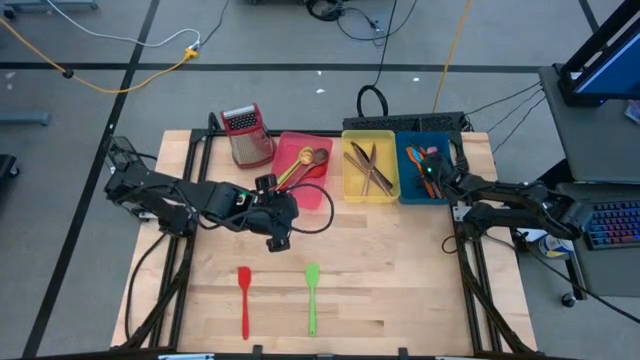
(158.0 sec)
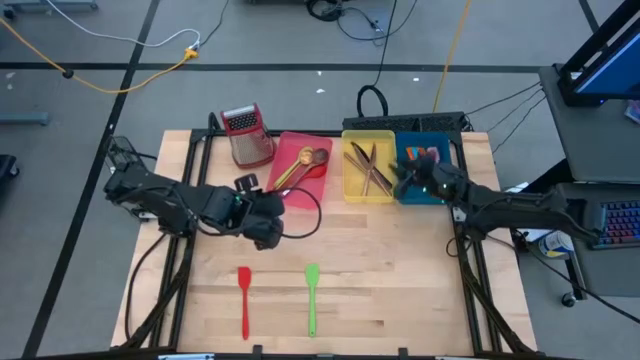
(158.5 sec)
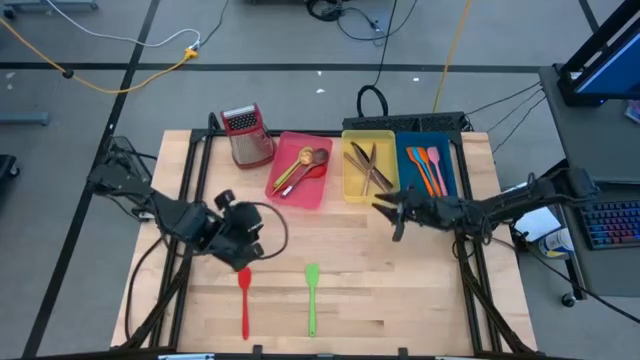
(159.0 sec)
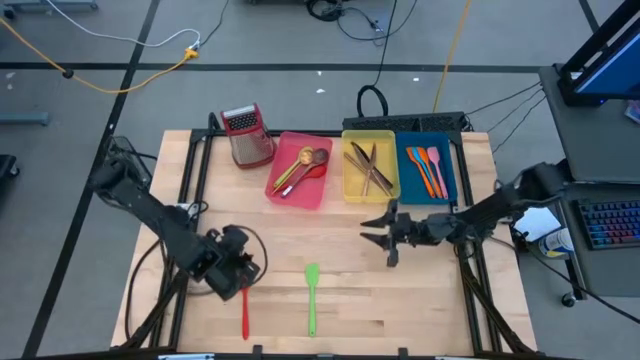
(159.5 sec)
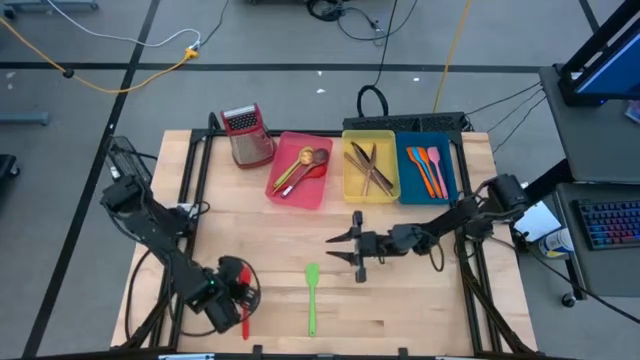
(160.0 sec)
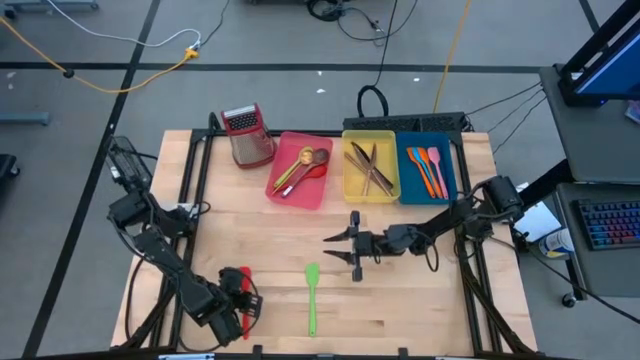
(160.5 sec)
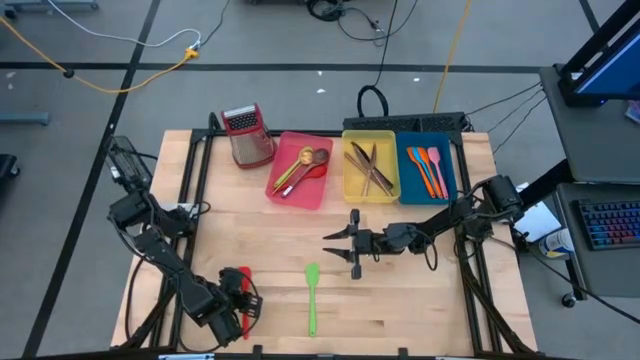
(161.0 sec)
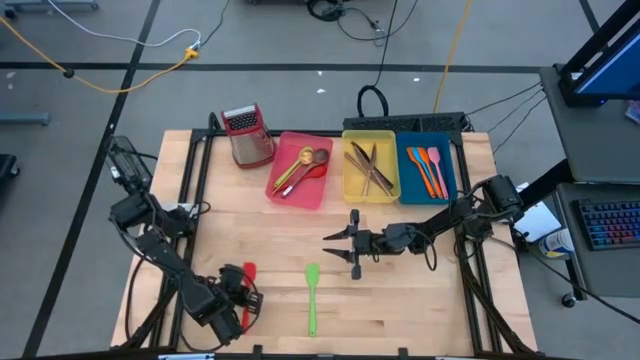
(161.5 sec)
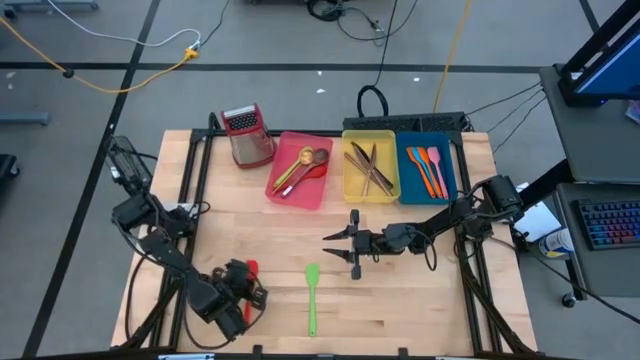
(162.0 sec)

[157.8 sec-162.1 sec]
Task: Pick & Place Kitchen Items
Put the red serving spoon into the blue bin

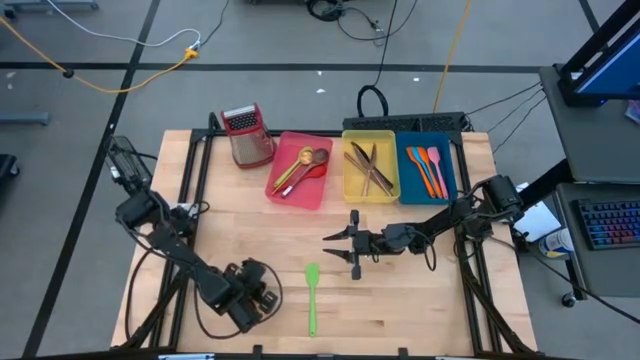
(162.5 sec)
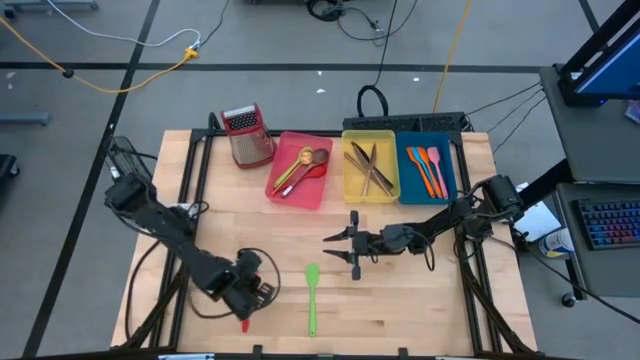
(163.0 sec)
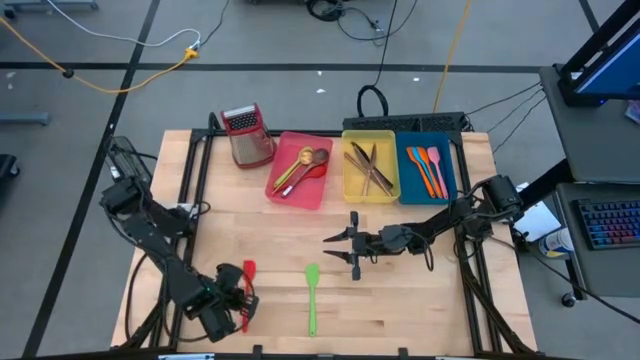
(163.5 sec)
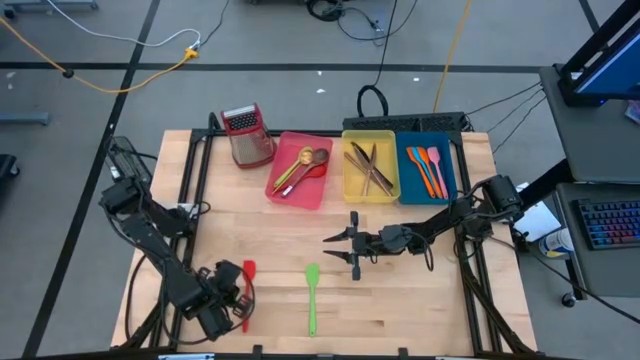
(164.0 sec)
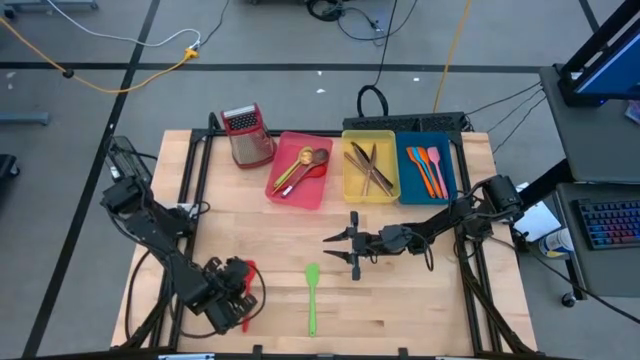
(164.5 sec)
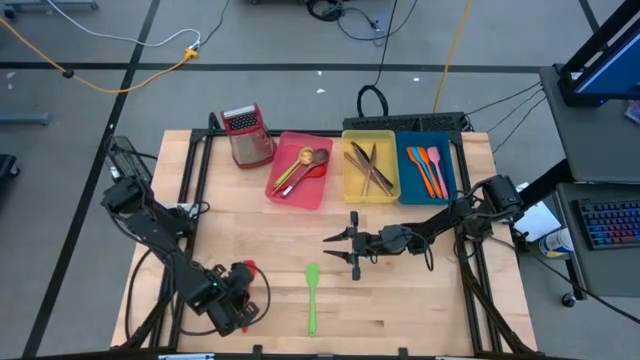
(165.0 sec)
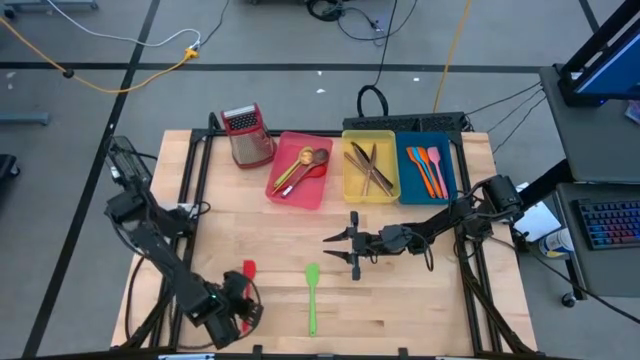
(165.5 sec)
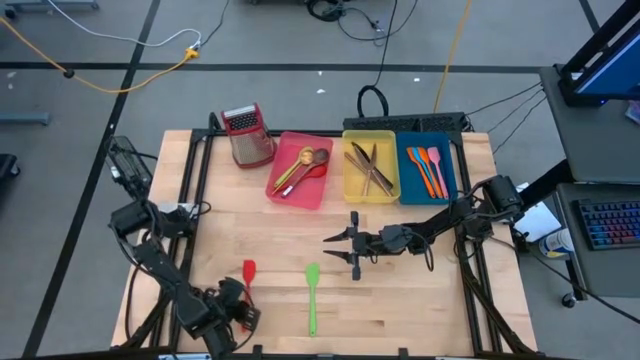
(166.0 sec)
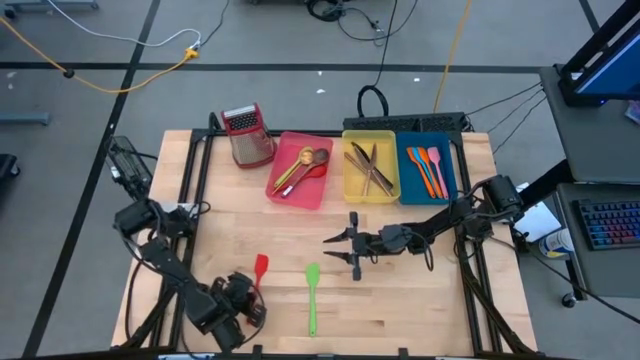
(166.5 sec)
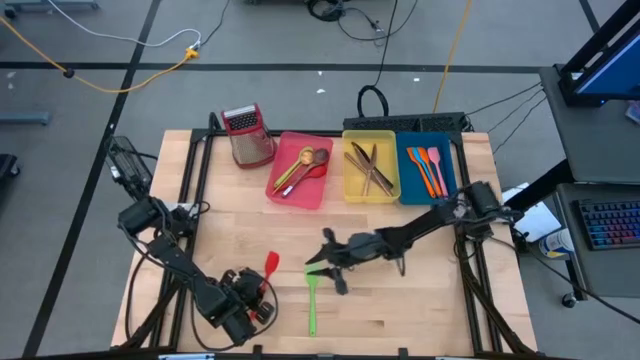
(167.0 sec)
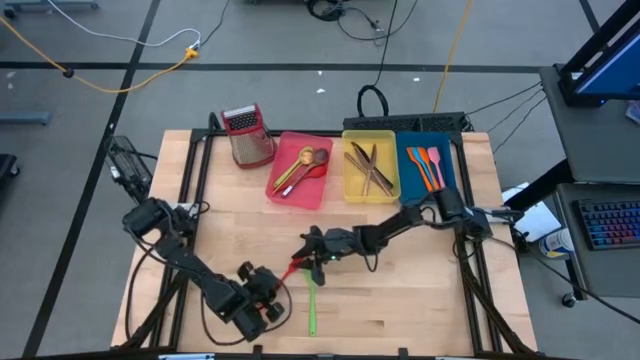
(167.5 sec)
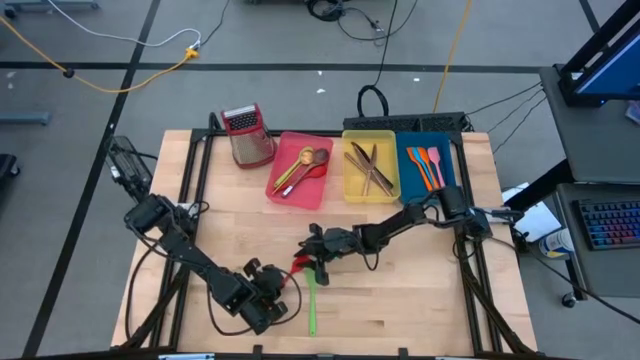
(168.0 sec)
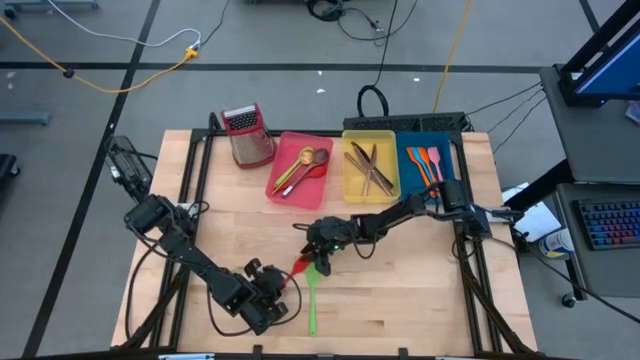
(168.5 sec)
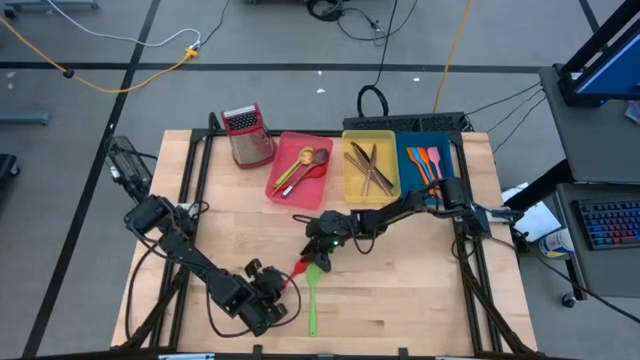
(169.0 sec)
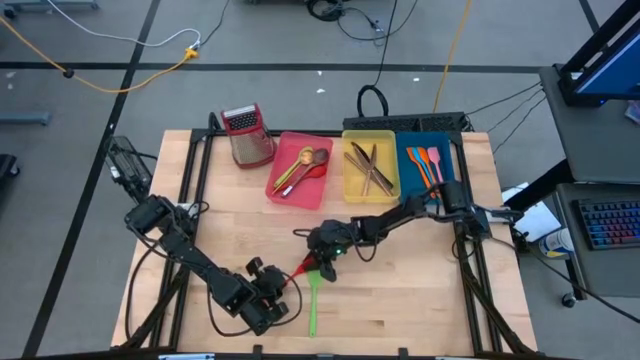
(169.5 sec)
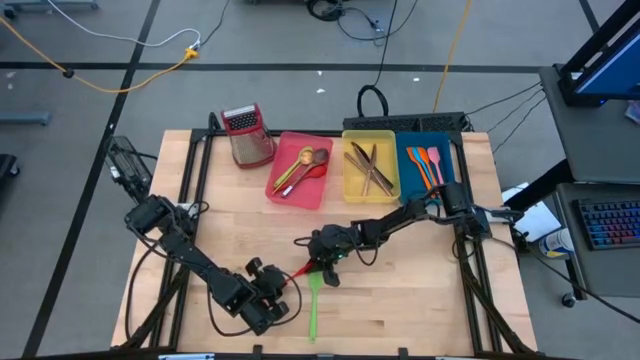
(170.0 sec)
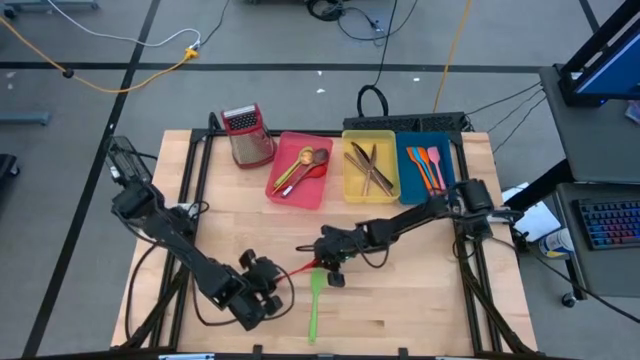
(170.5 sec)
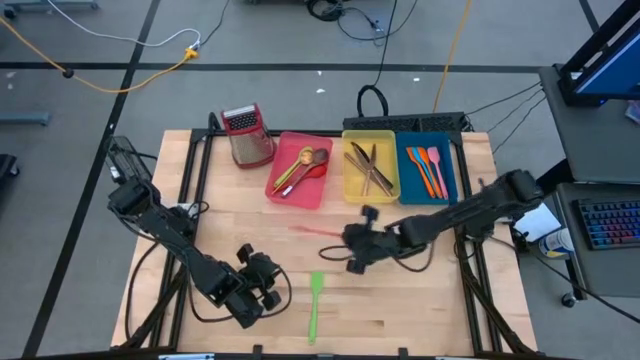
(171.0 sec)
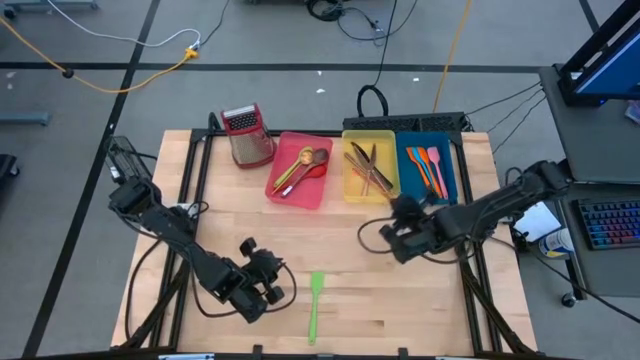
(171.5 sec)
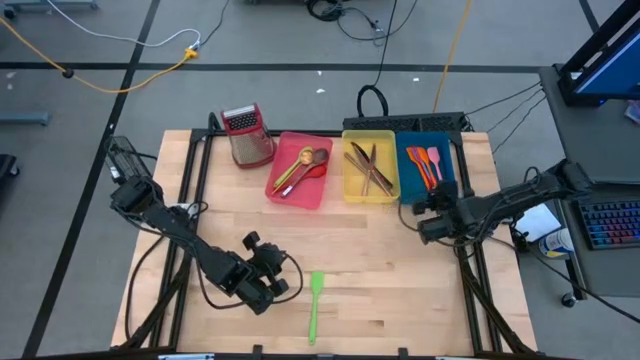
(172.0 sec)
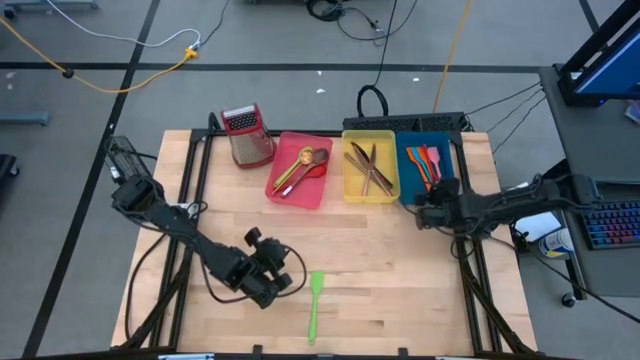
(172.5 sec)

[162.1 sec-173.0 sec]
Put the red serving spoon into the blue bin

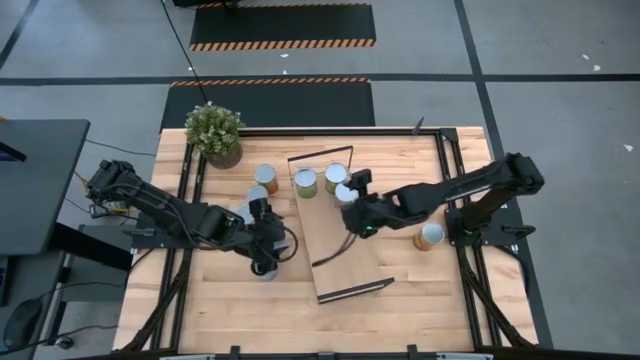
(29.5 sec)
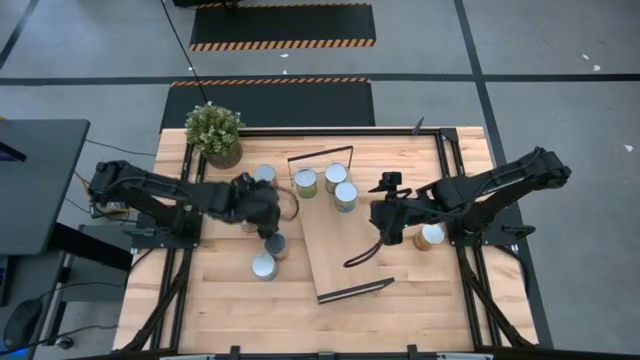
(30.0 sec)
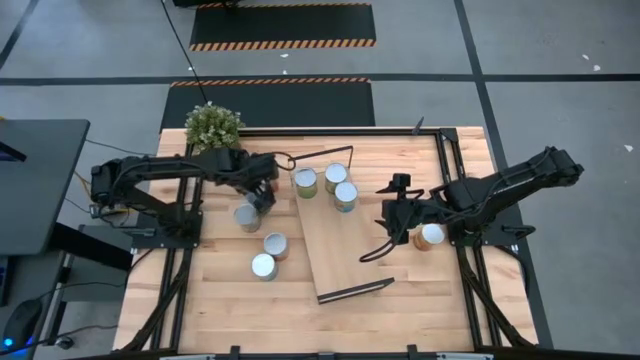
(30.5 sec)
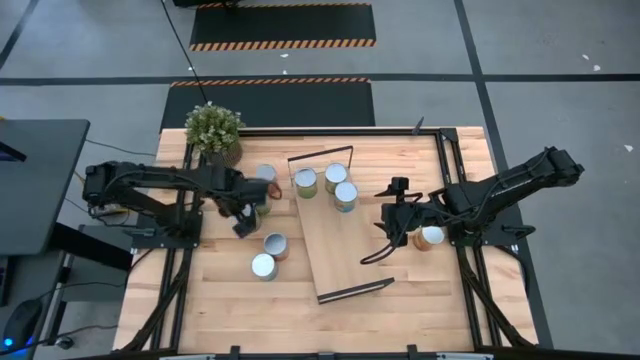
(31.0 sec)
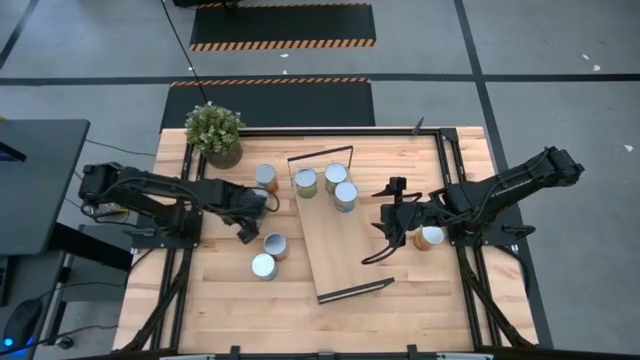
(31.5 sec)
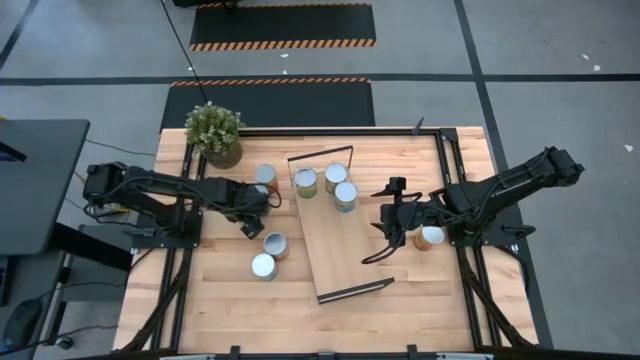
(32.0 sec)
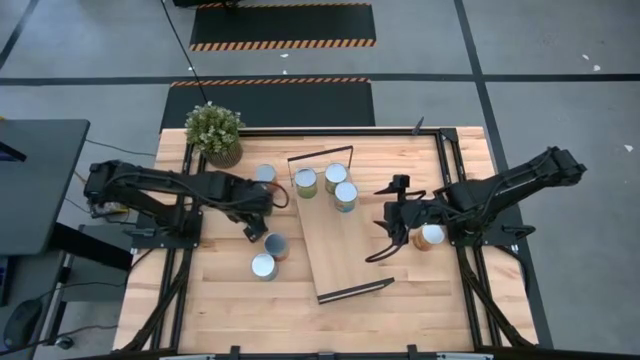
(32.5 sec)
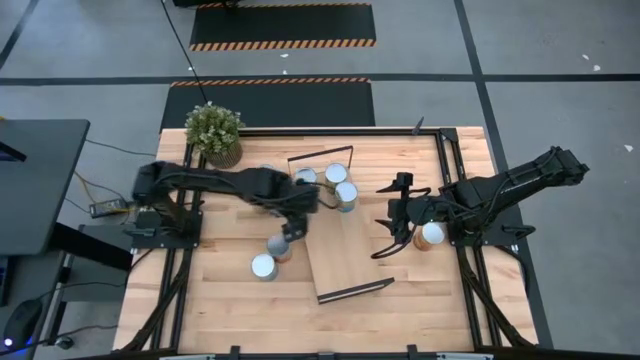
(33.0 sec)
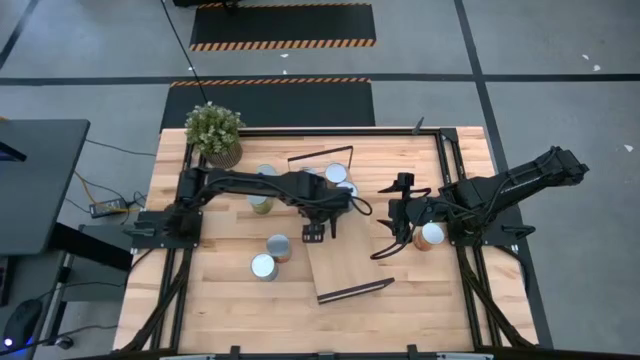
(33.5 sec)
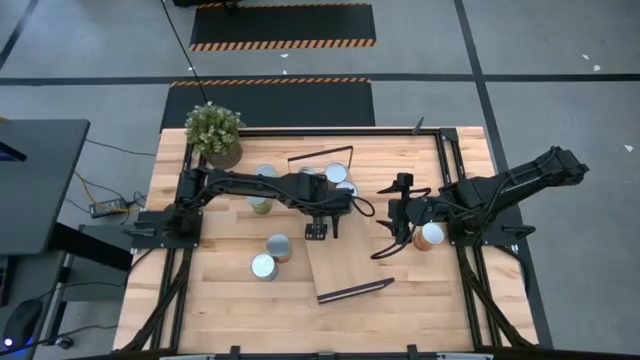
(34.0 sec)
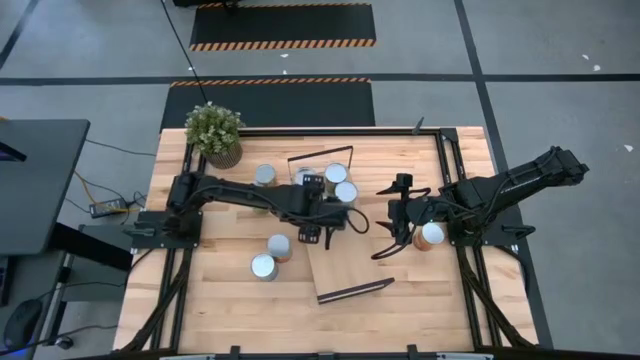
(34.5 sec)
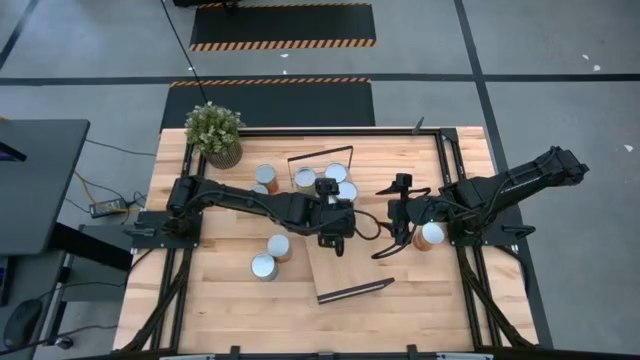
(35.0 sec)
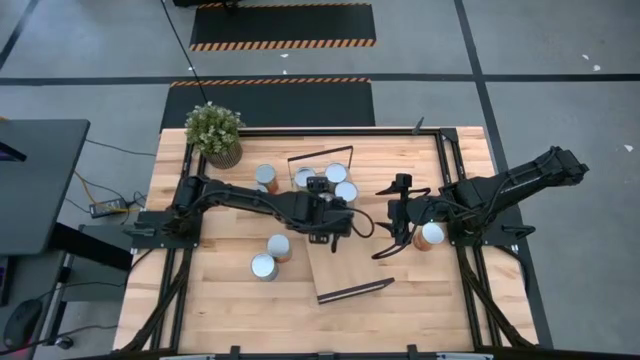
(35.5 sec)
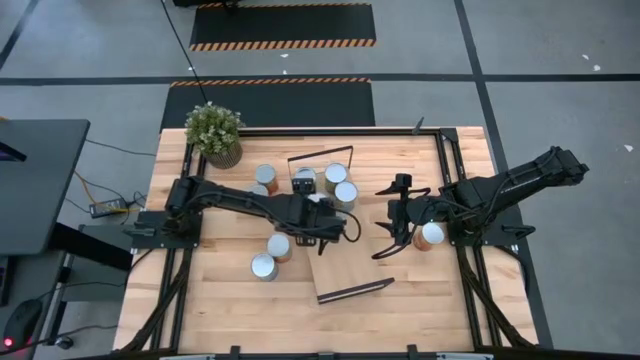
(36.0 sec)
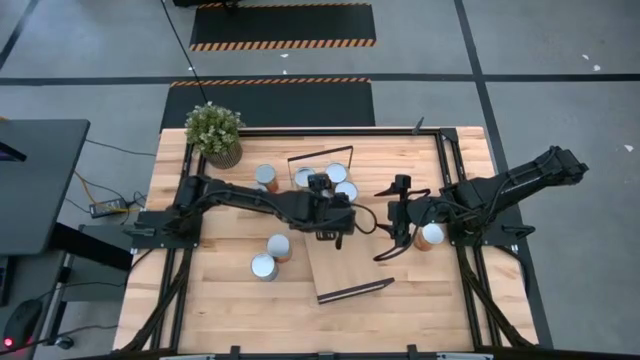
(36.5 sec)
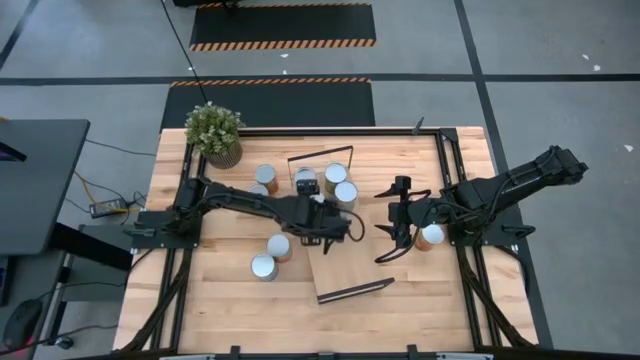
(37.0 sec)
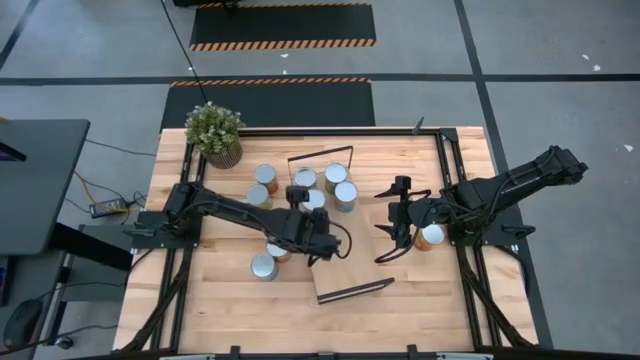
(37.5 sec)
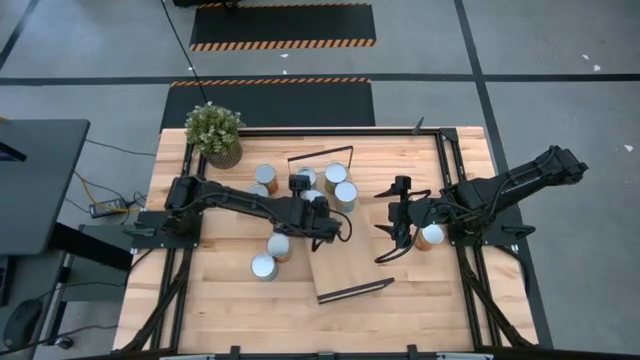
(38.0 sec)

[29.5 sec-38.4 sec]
Task: Pick and place cans onto a shelf
Put the bottom canned peas on the shelf
